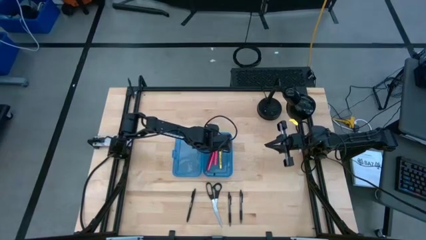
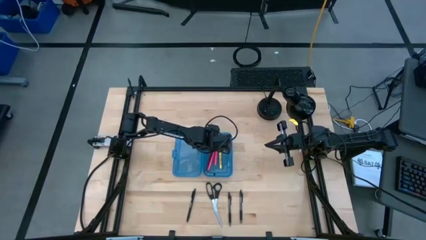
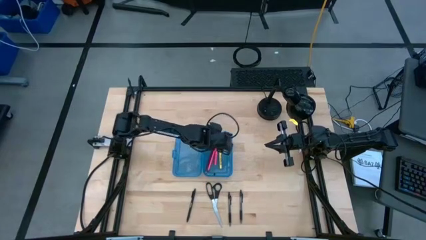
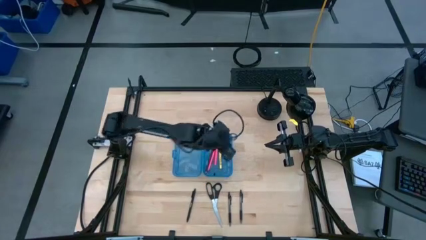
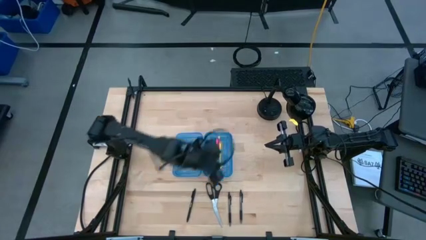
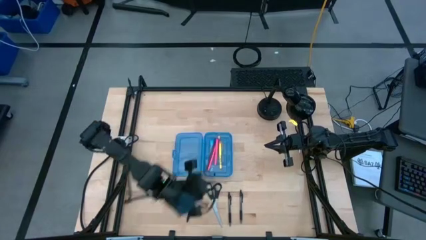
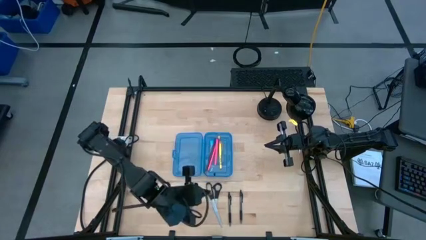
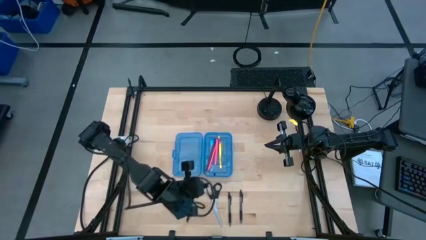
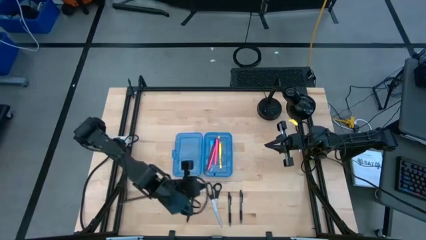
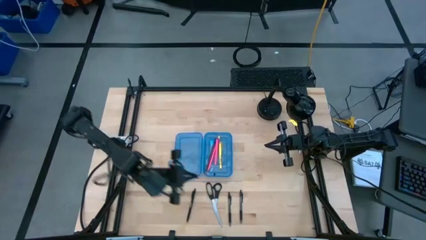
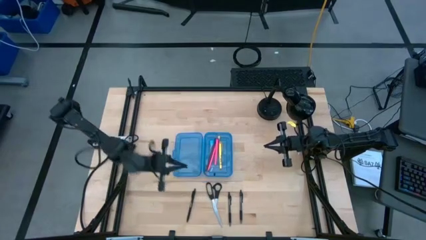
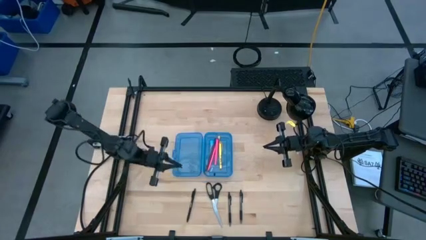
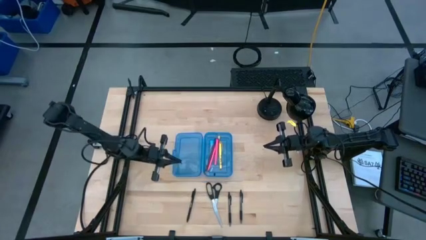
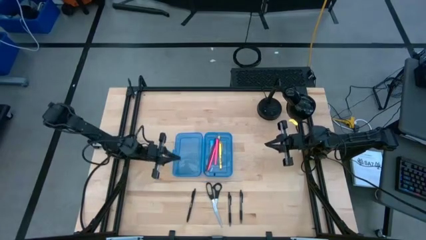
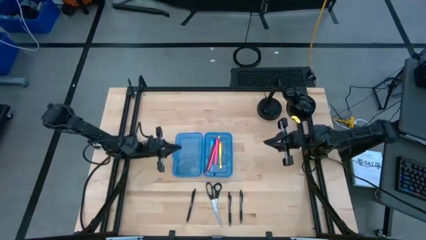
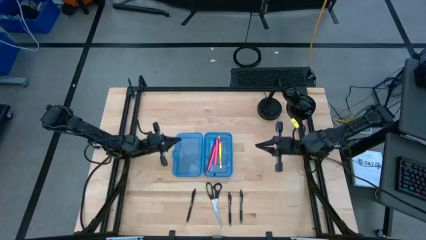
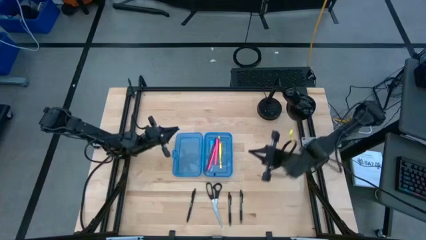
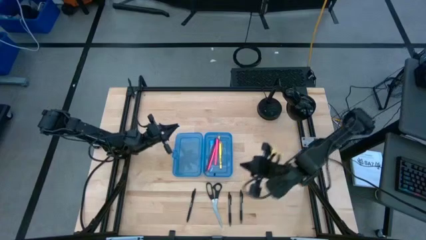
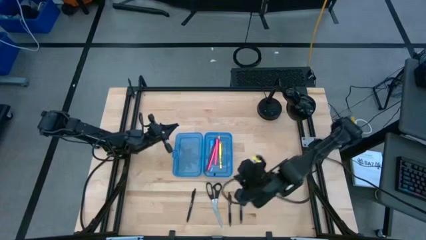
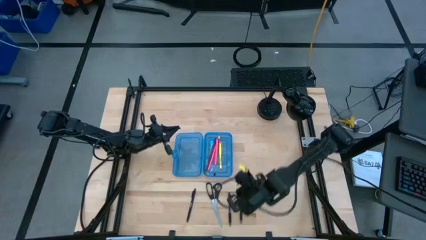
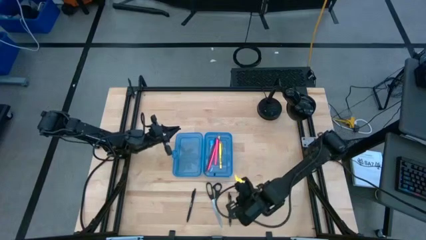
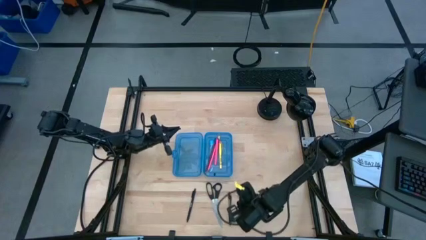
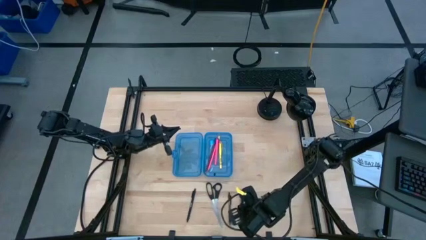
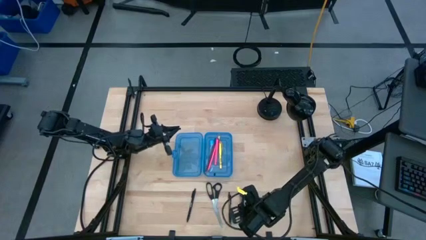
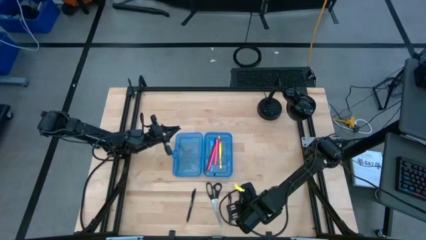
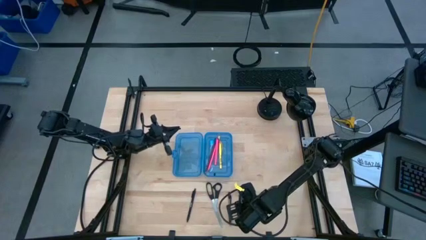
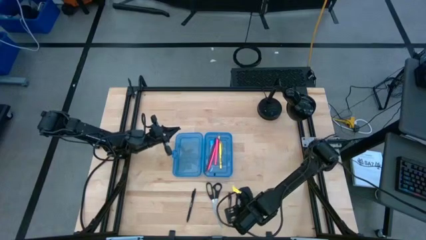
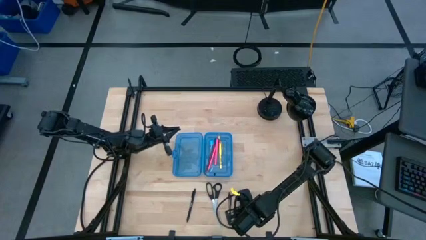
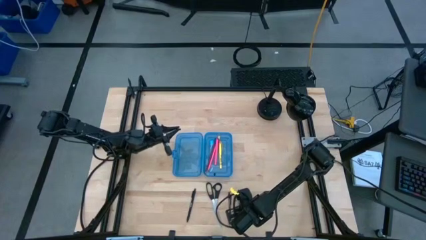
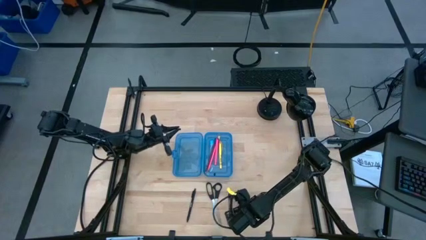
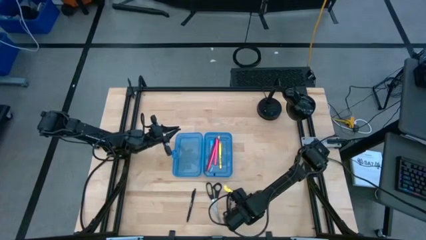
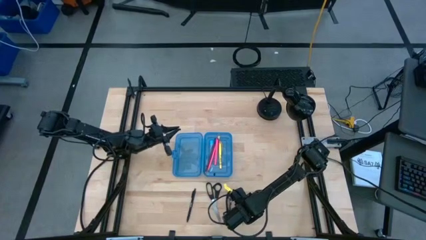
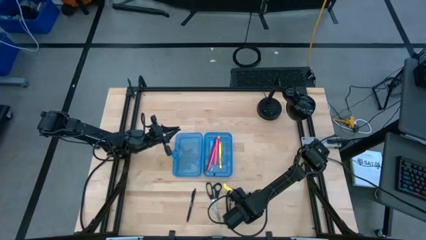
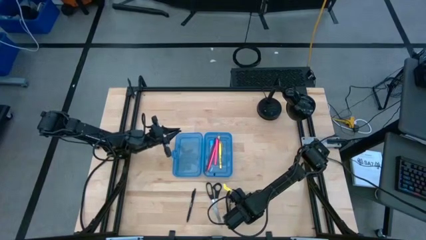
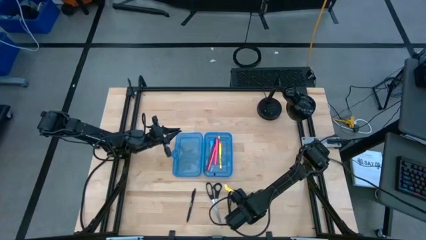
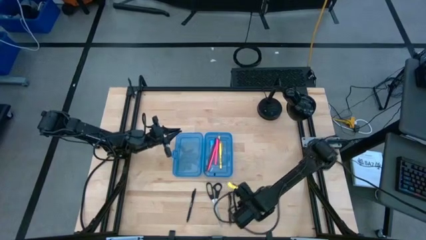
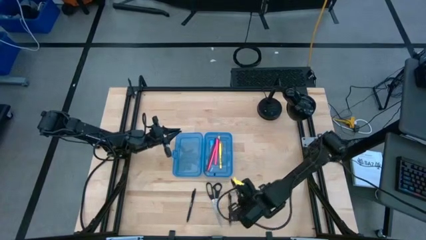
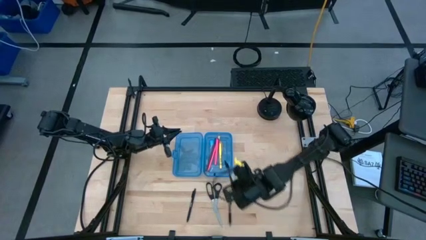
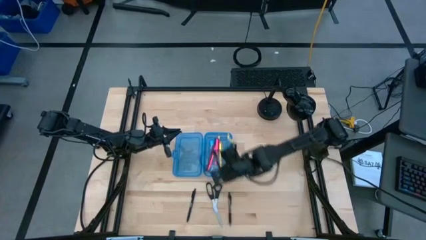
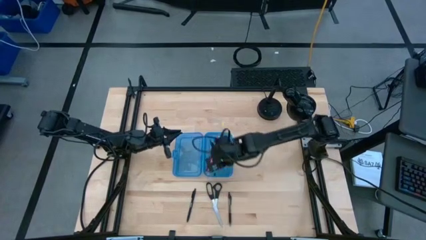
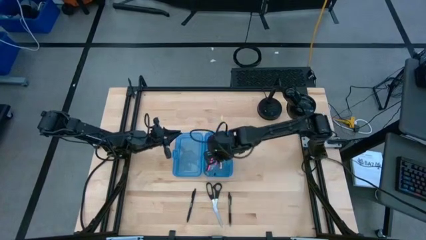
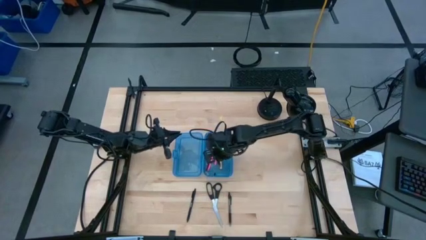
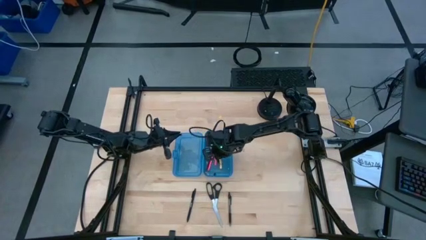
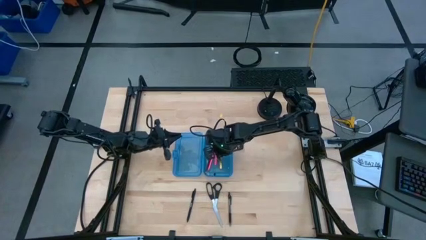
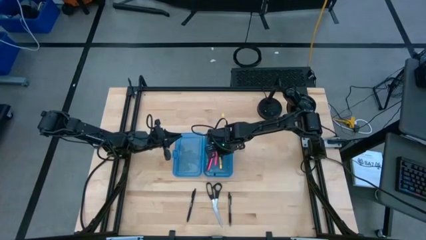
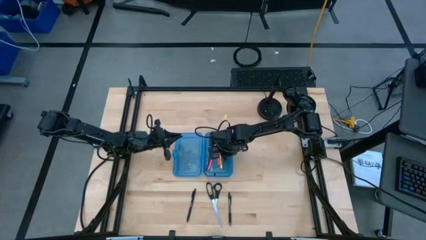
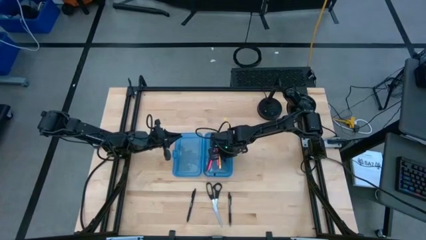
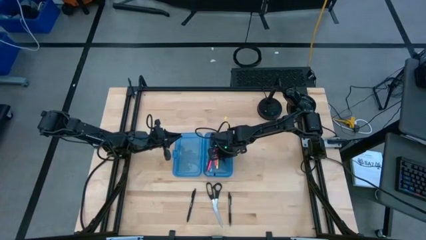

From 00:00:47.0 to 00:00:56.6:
Task: Pick & place school supplies into a supply box
Put the right black pen into the blue pencil box

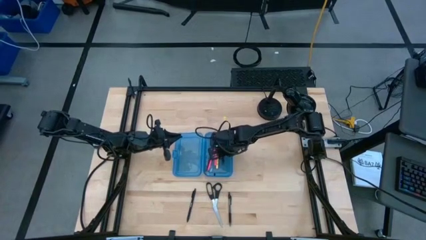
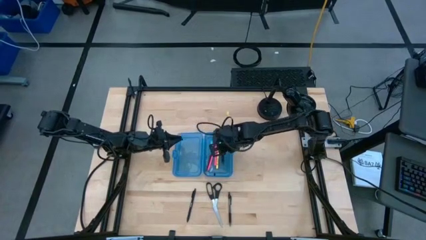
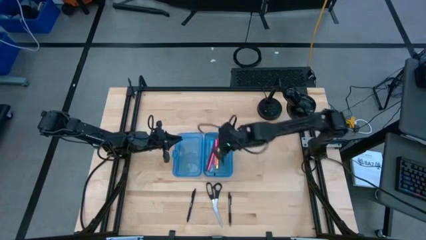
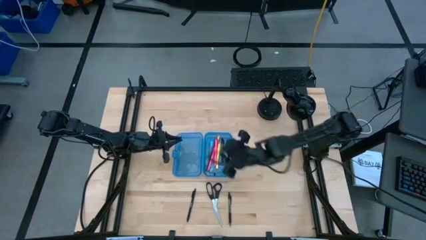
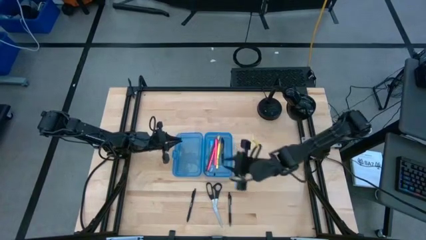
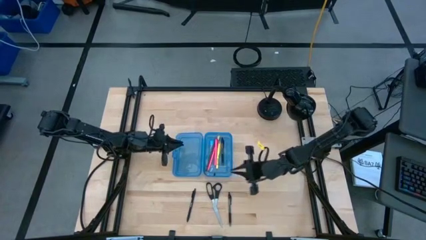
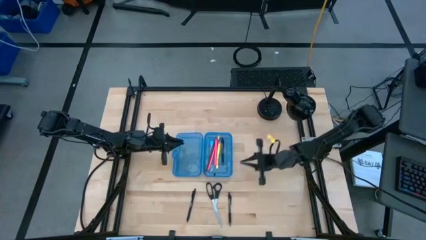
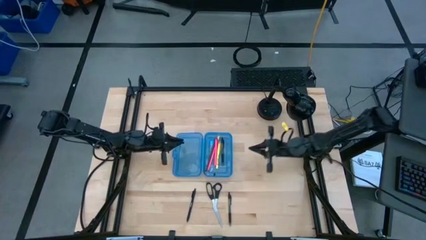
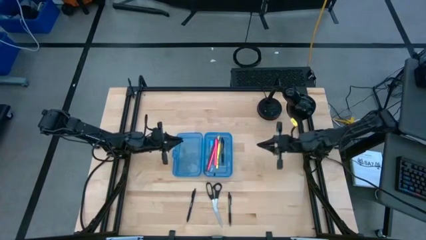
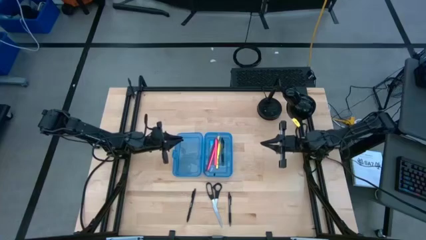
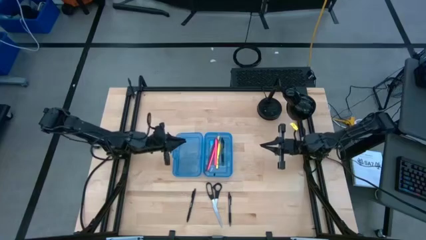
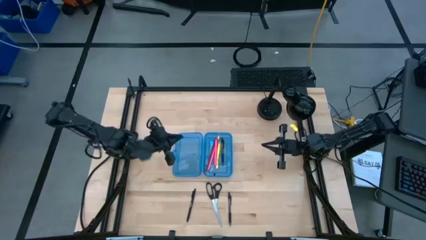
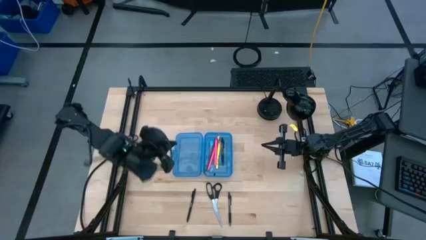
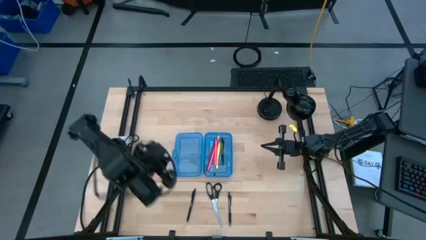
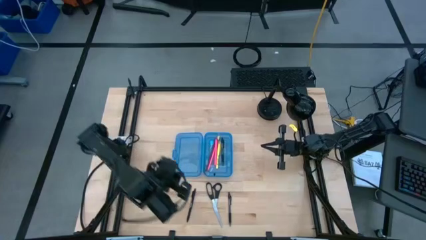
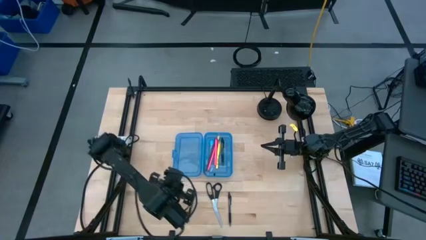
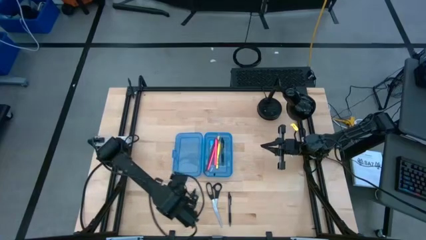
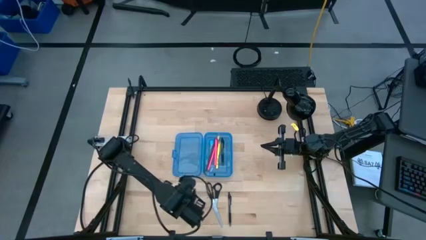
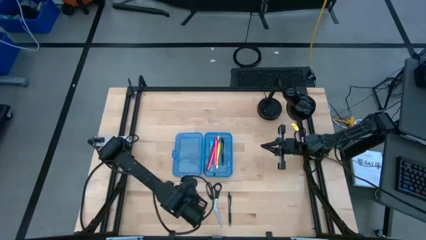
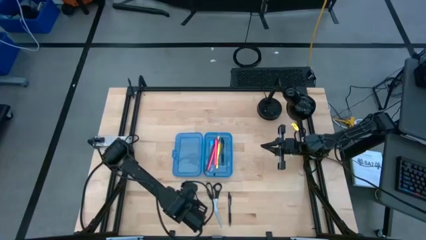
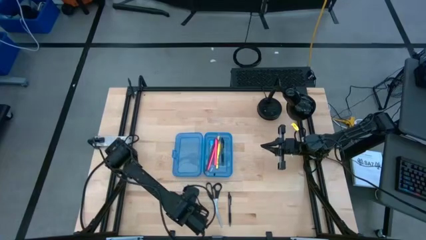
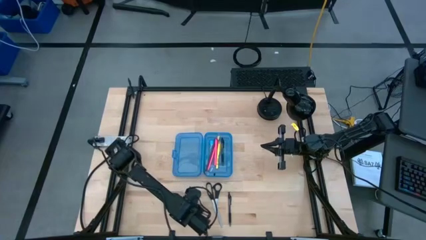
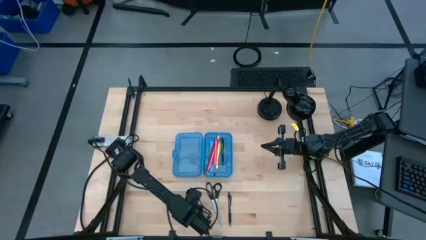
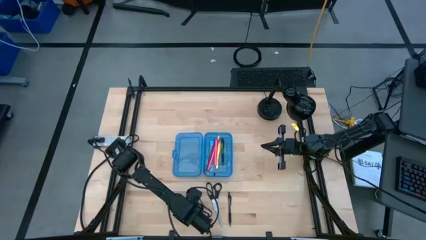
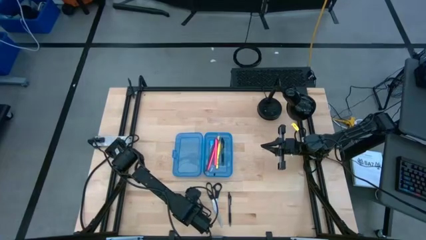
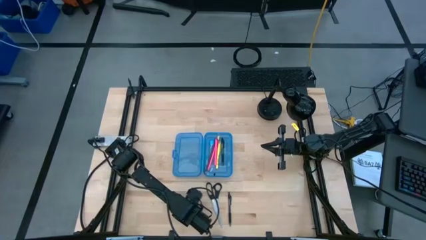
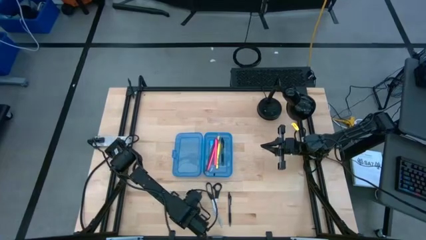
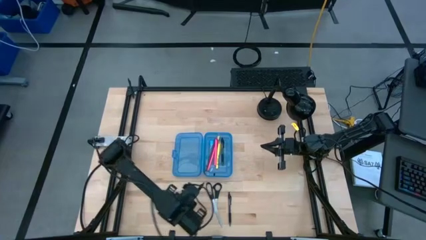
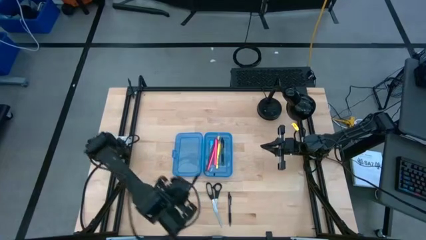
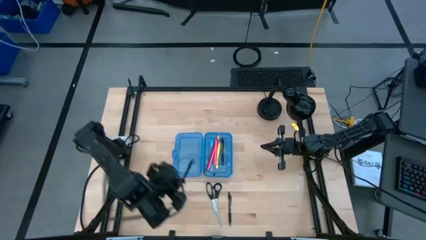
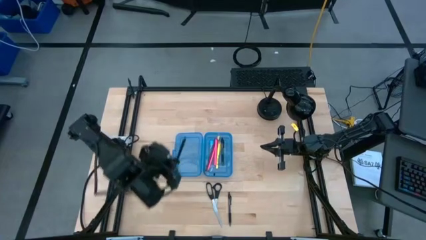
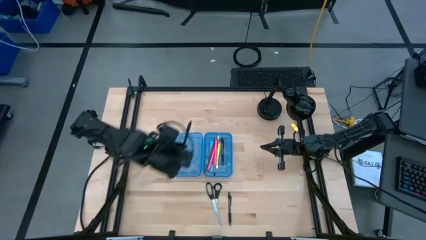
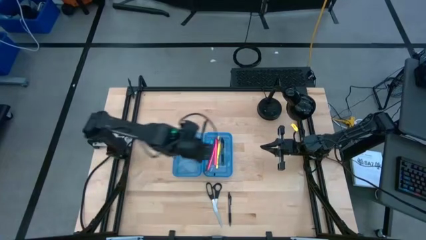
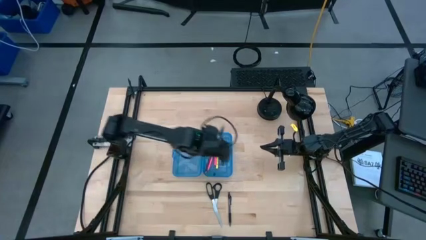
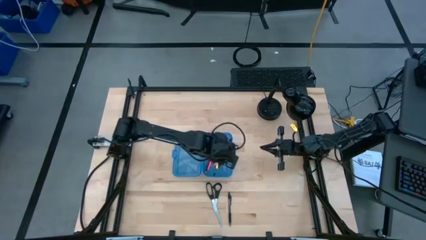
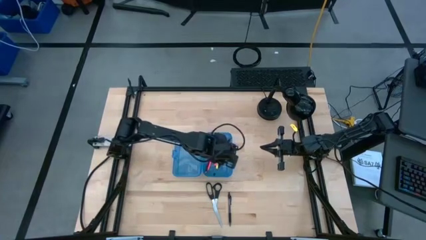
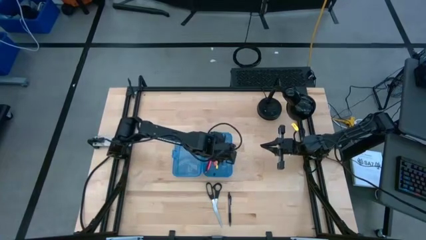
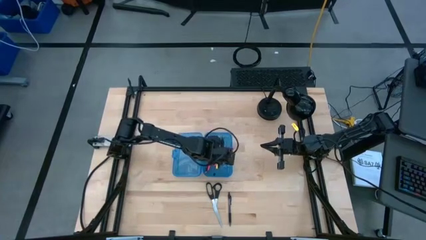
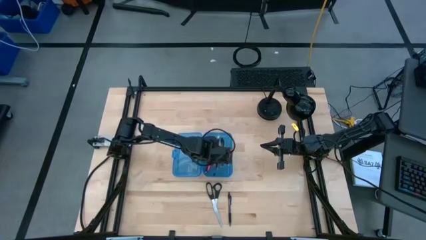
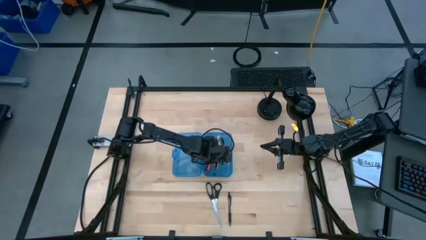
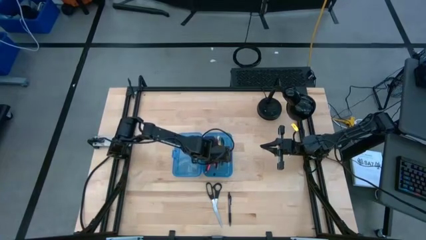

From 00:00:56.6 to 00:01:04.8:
Put the left black pen into the blue pencil box
